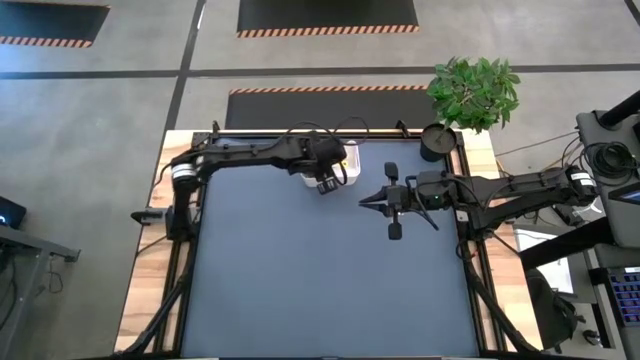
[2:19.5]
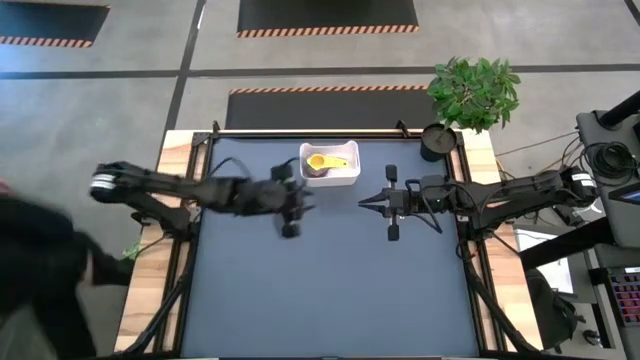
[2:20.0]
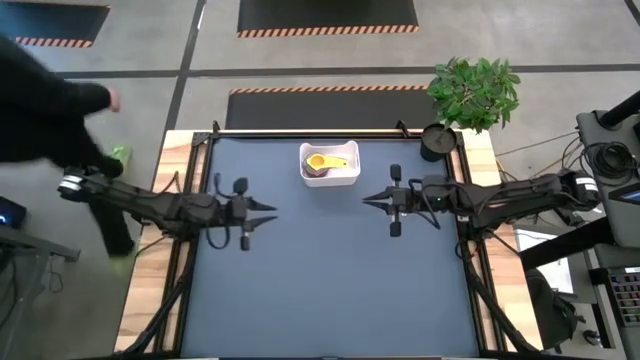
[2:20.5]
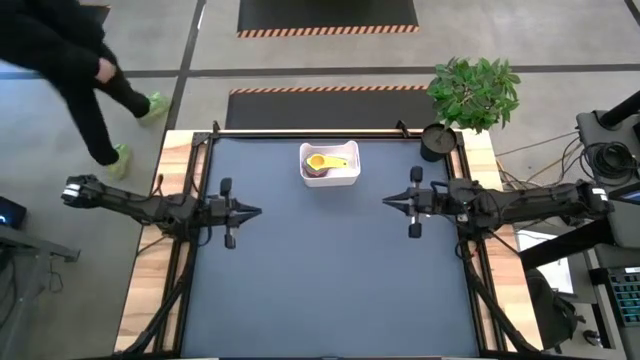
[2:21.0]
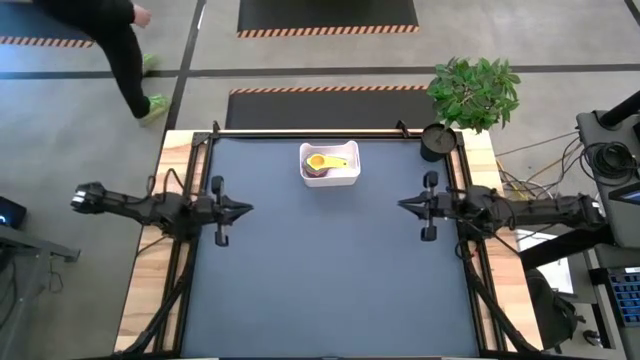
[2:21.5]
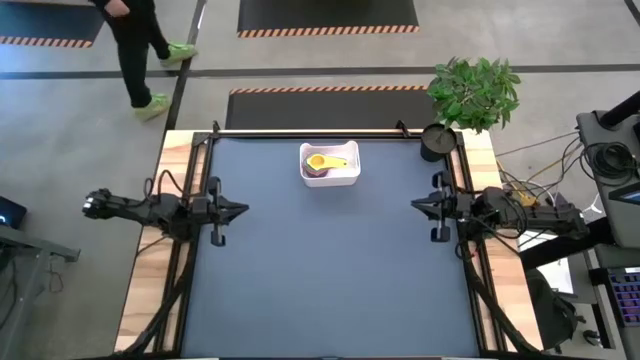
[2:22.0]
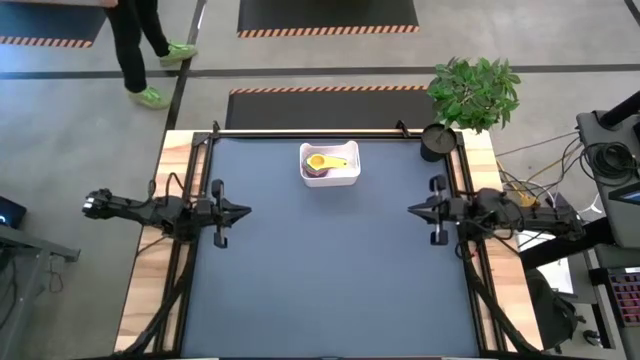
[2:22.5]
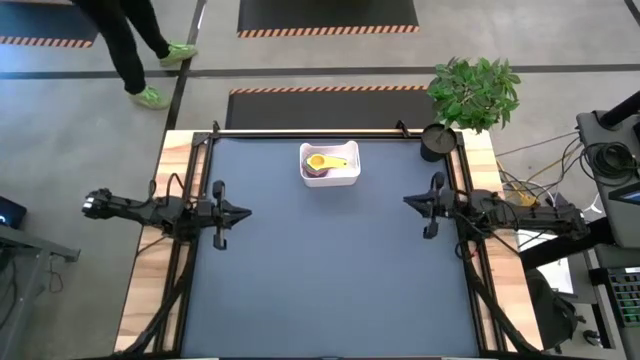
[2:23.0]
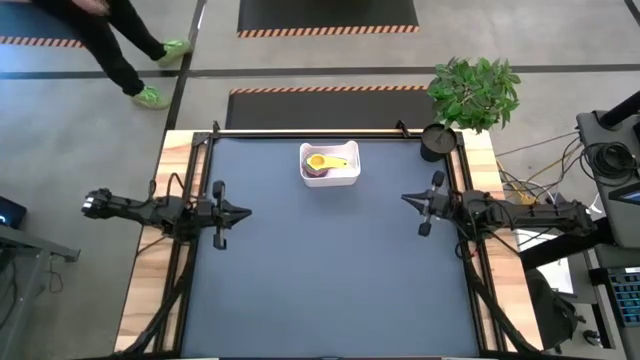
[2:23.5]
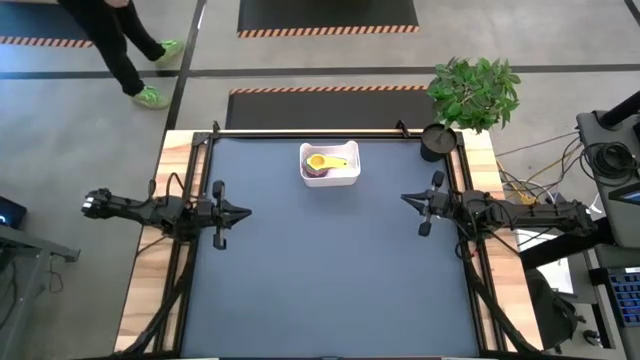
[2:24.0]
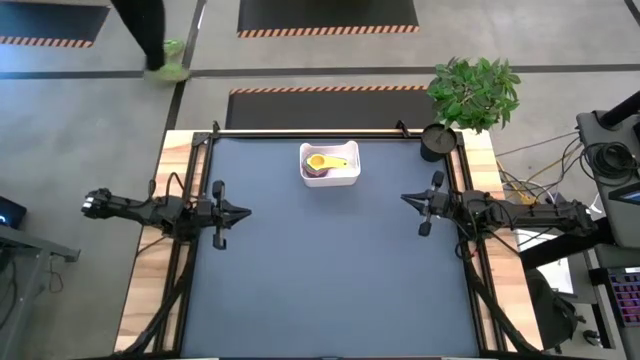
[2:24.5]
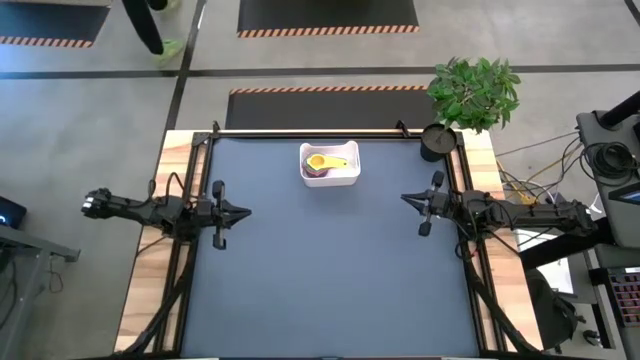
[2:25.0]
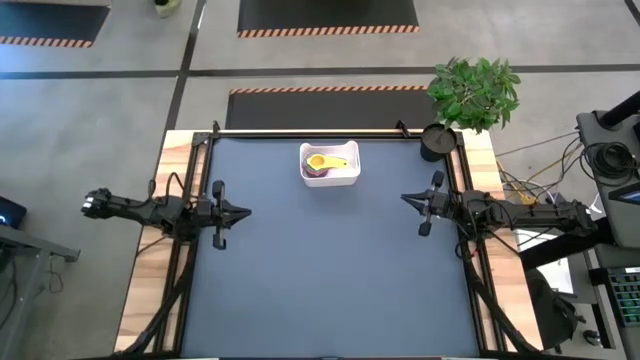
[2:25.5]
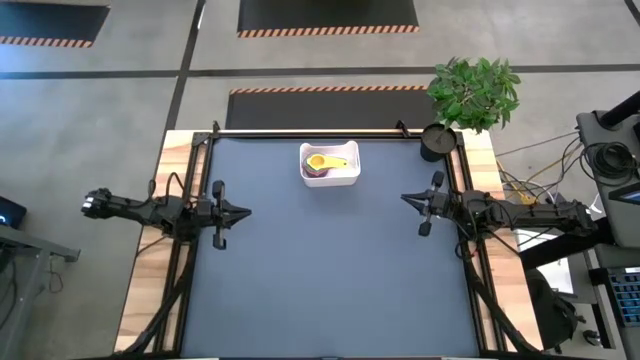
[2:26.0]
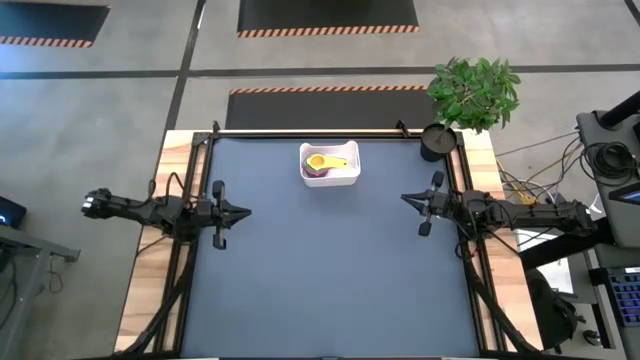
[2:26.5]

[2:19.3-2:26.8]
Task: Nest measuring cups in basket
Return to Home Position

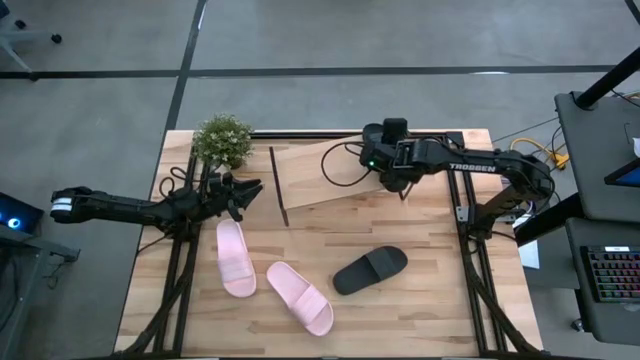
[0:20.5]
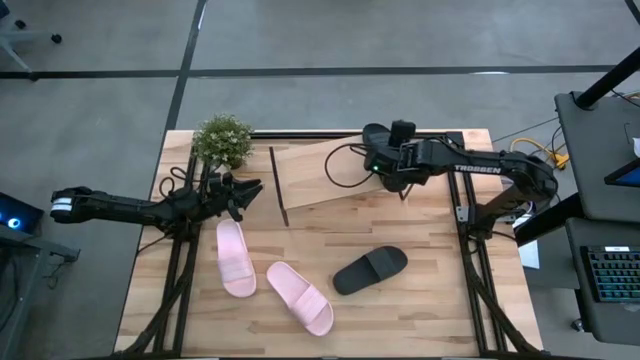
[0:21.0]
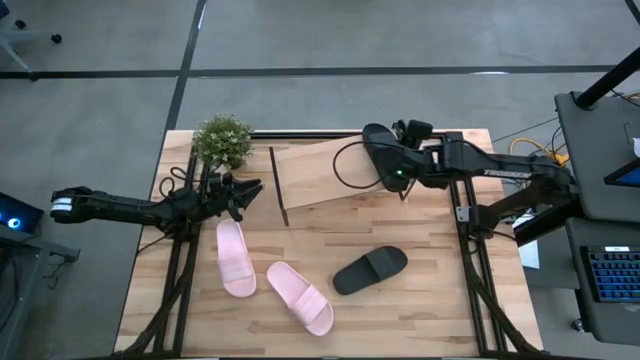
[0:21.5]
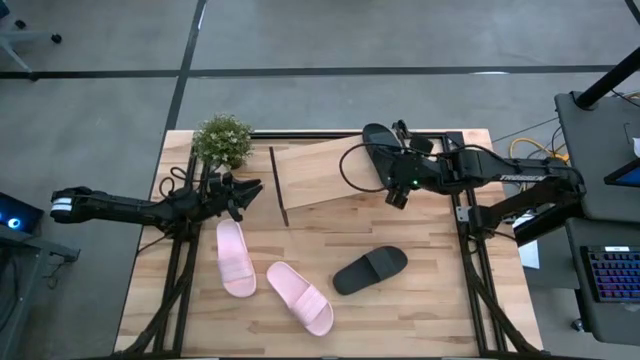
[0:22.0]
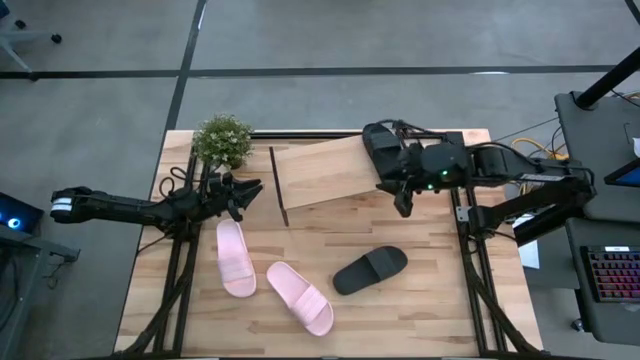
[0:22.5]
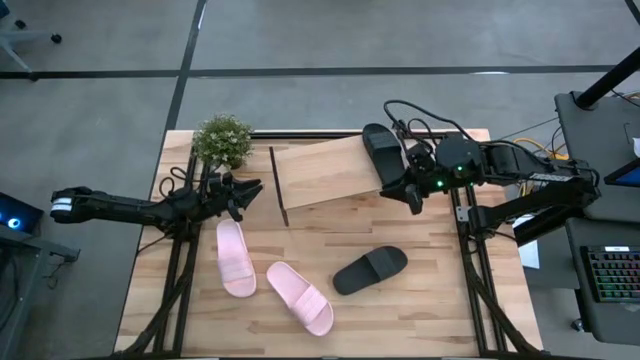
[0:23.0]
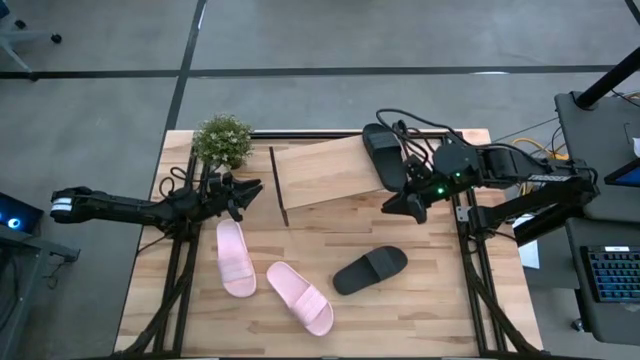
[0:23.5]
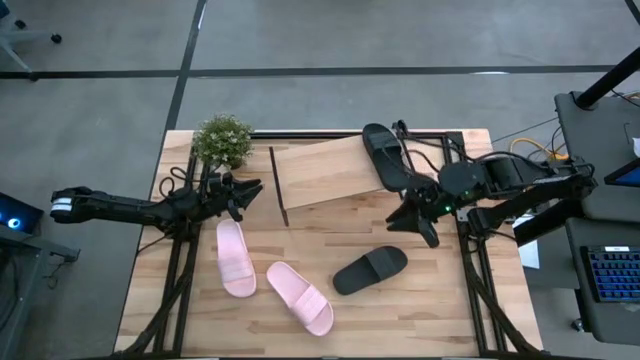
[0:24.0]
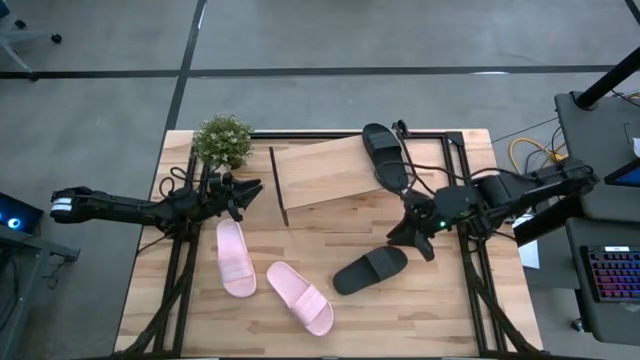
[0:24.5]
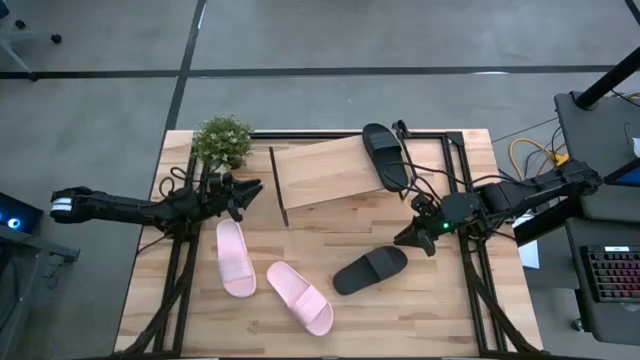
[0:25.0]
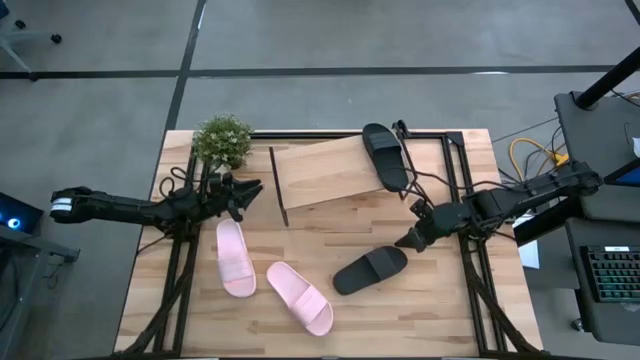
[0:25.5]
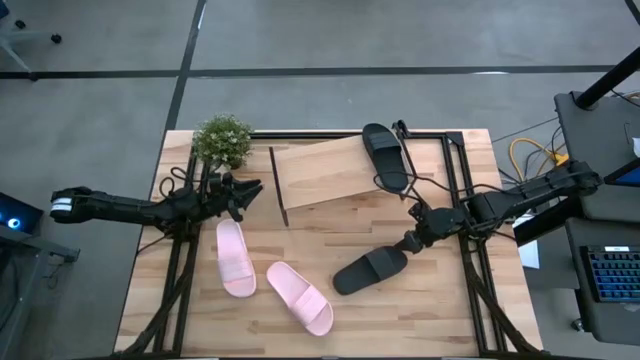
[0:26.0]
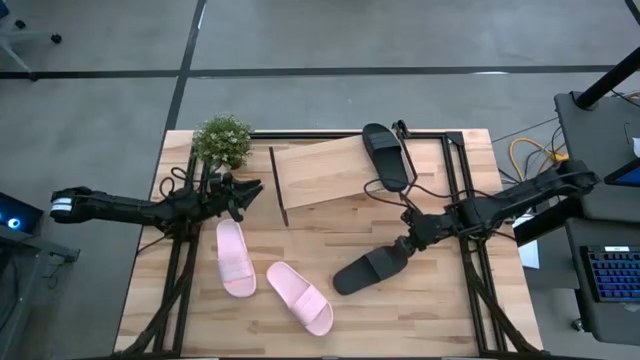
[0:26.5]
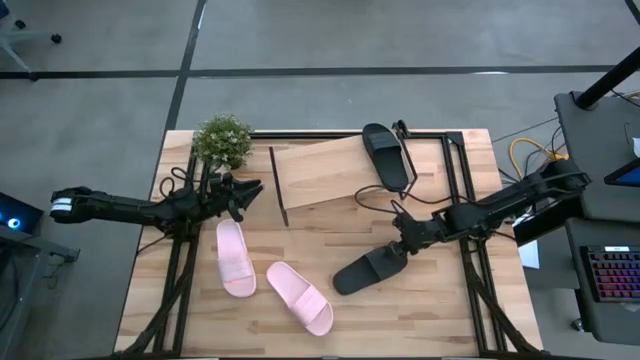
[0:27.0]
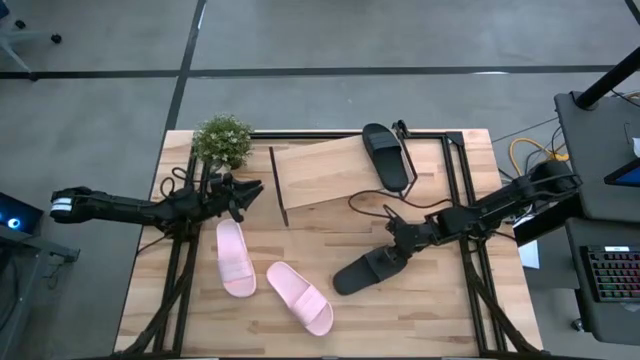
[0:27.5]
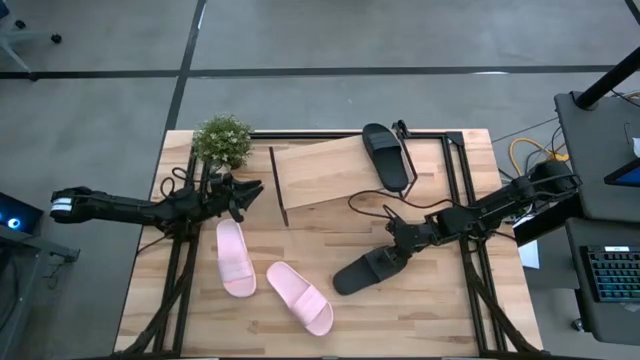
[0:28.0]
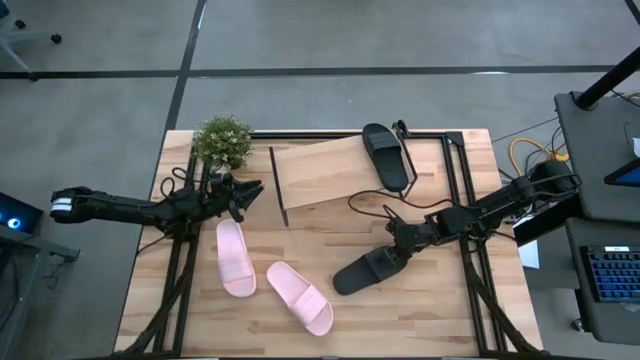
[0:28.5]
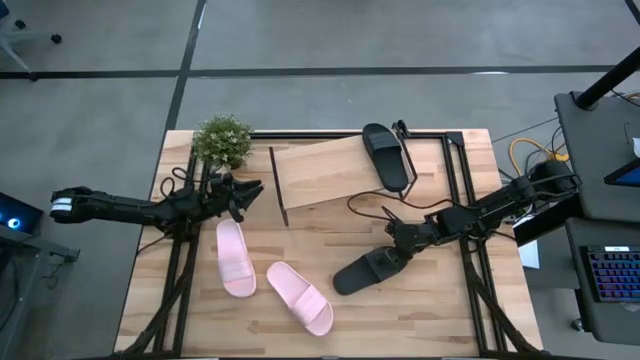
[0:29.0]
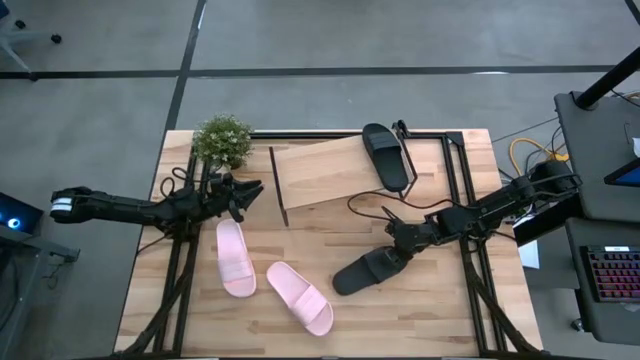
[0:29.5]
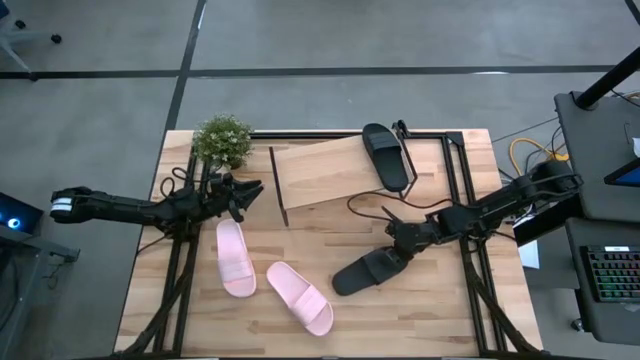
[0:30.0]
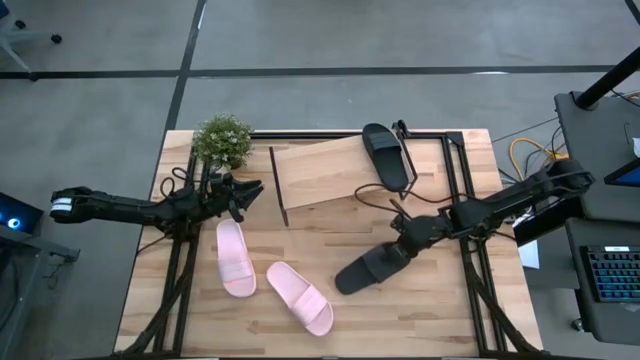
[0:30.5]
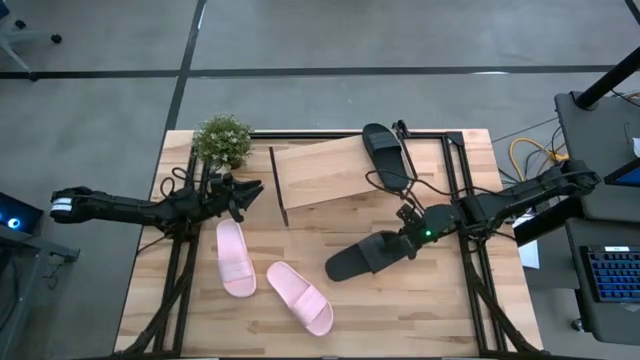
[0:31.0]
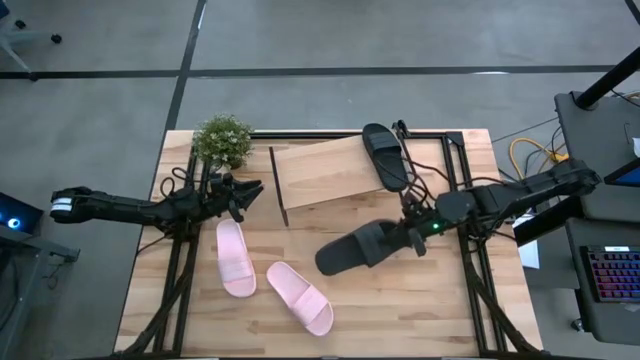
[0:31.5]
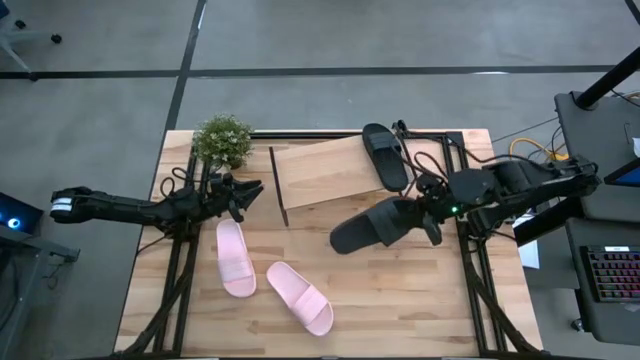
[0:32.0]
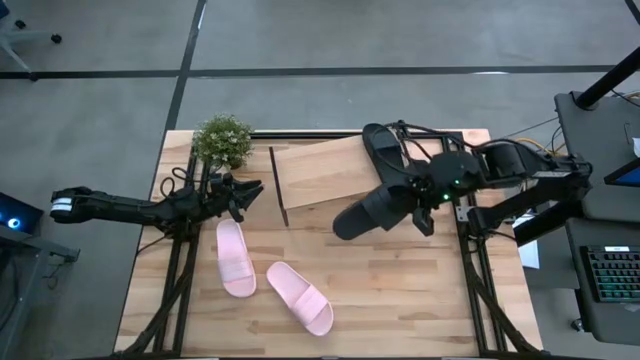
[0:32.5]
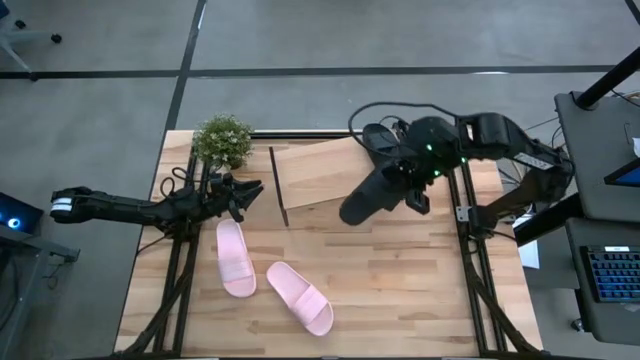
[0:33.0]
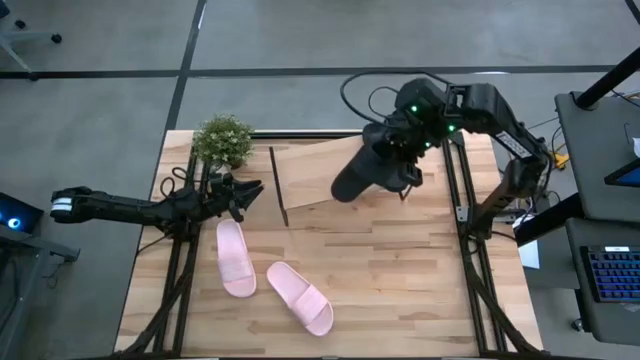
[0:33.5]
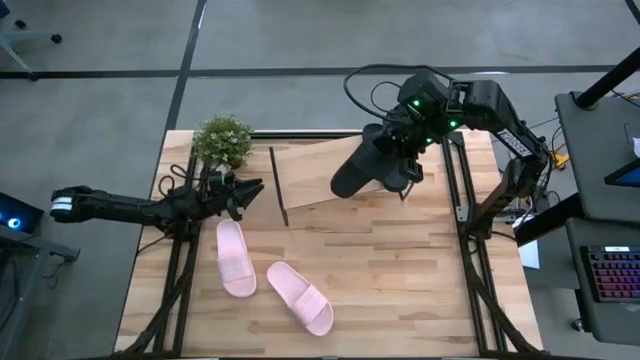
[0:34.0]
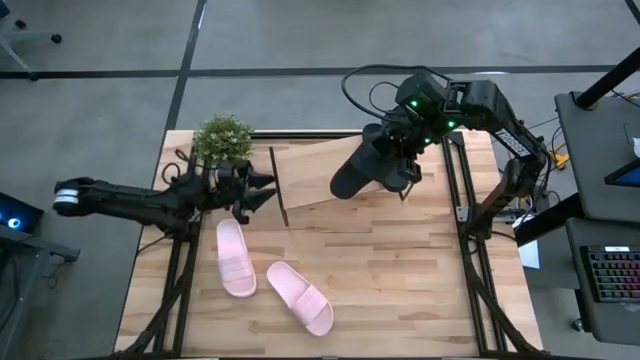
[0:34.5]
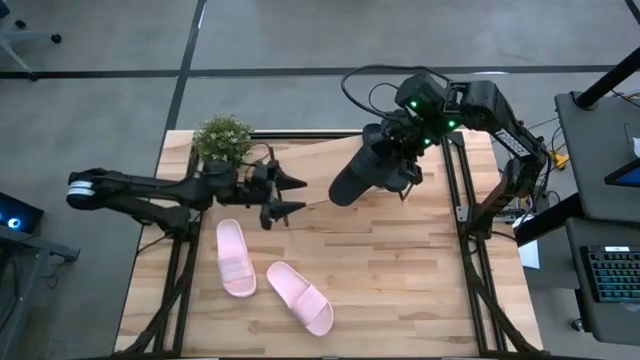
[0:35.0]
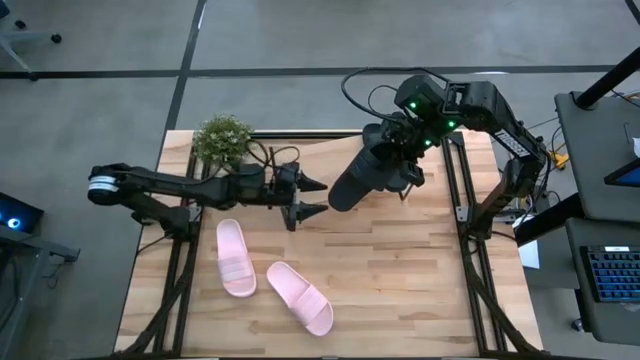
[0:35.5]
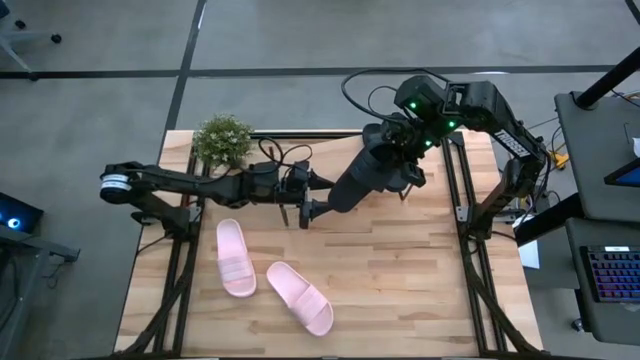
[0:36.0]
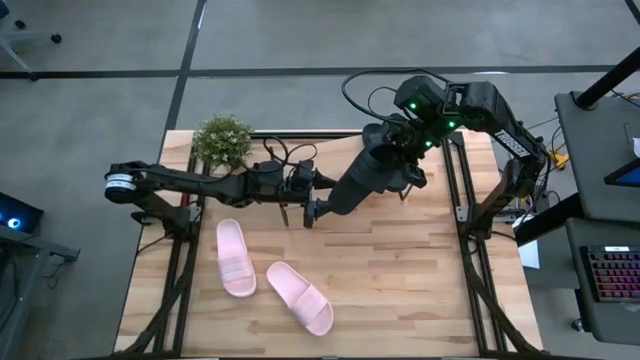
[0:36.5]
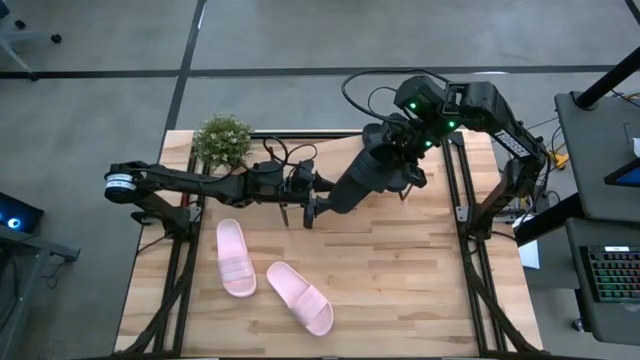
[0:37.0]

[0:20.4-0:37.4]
Task: Pick and place slides into the shelf
Put the black slipper on the shelf
